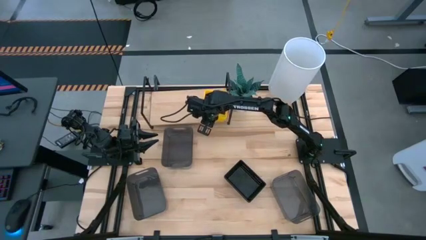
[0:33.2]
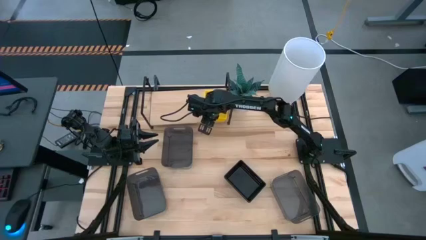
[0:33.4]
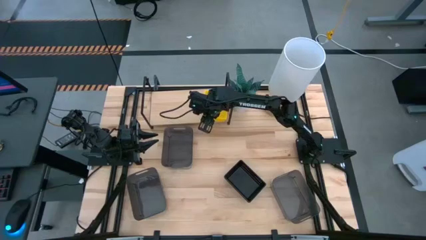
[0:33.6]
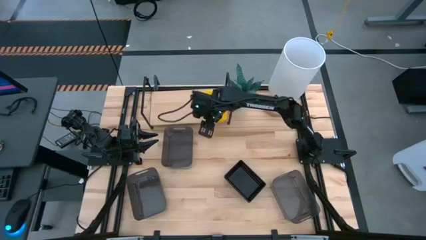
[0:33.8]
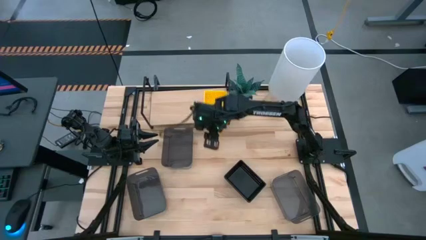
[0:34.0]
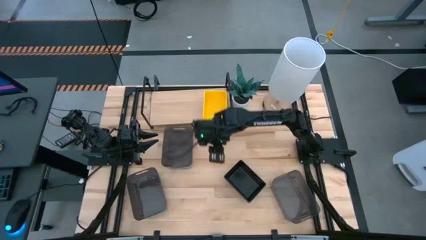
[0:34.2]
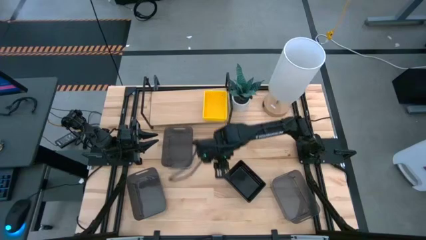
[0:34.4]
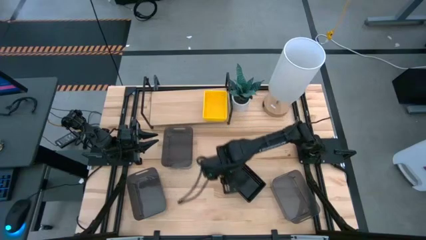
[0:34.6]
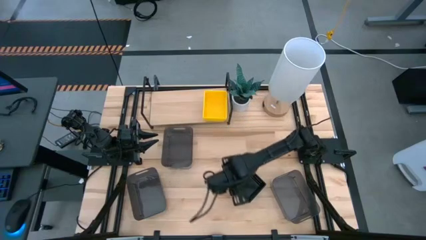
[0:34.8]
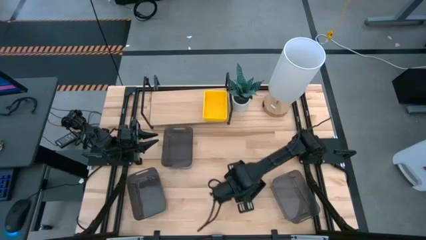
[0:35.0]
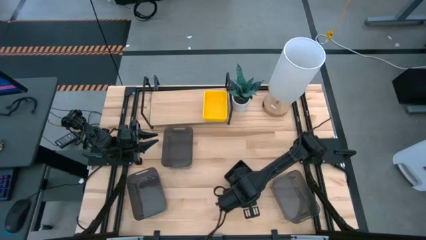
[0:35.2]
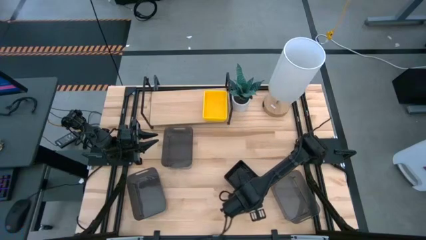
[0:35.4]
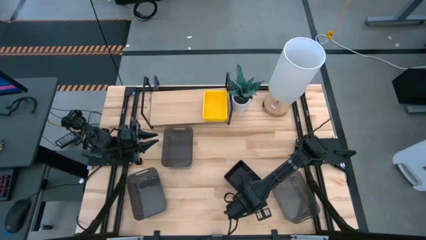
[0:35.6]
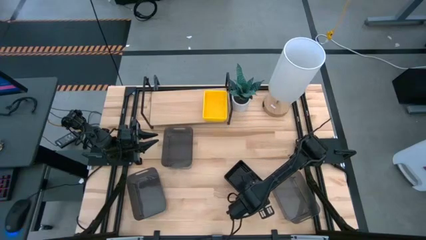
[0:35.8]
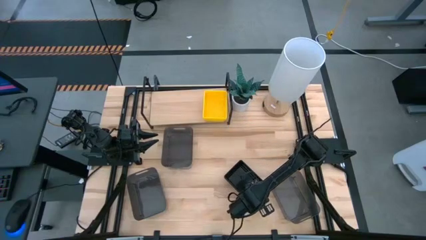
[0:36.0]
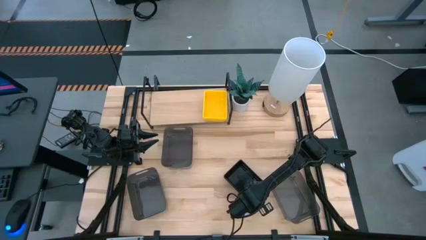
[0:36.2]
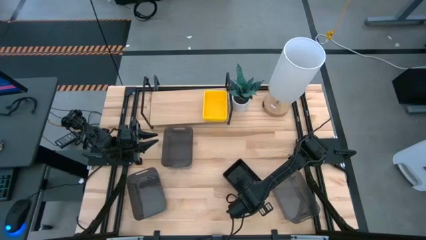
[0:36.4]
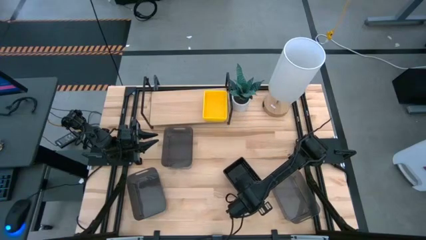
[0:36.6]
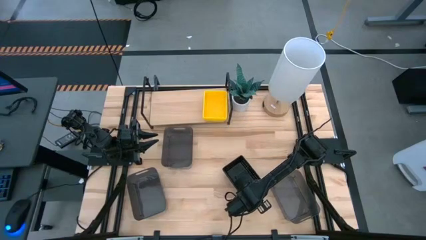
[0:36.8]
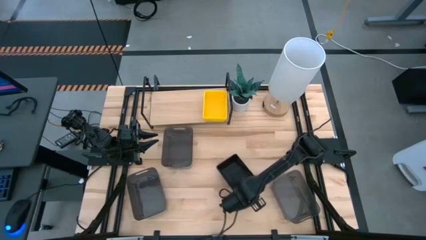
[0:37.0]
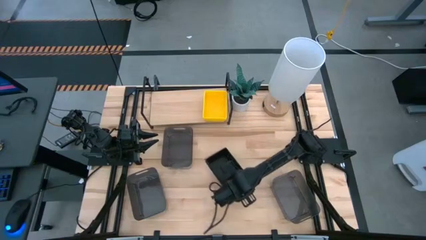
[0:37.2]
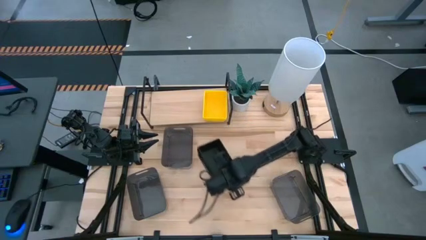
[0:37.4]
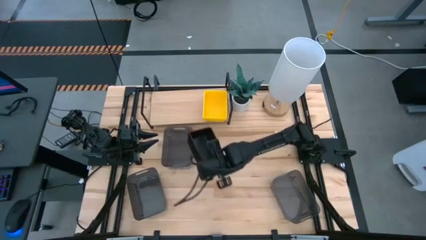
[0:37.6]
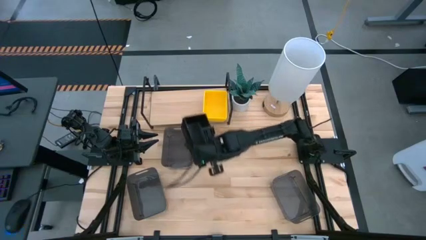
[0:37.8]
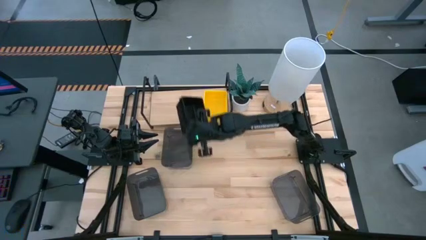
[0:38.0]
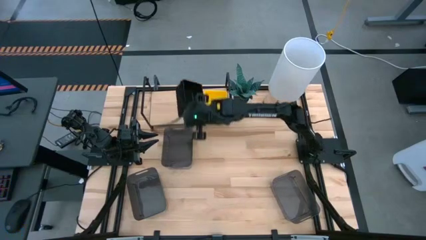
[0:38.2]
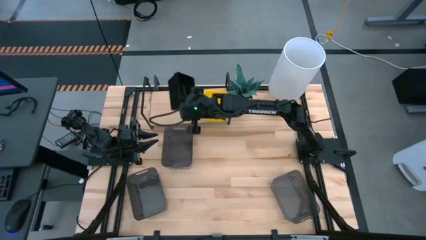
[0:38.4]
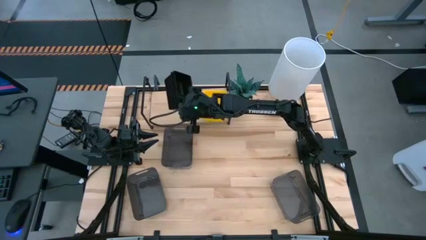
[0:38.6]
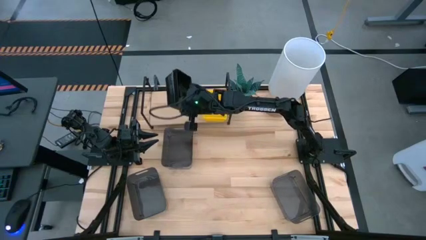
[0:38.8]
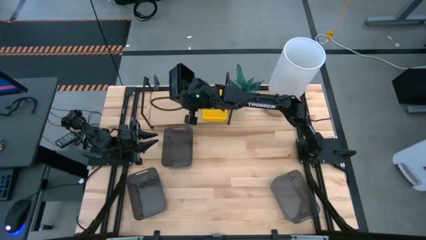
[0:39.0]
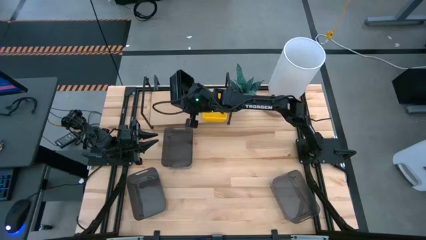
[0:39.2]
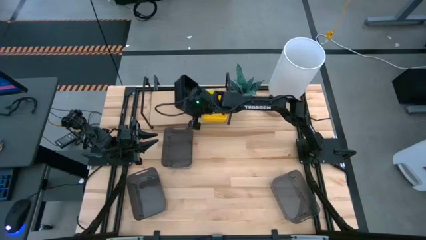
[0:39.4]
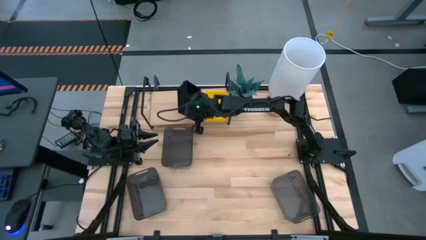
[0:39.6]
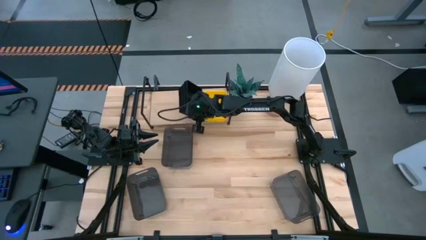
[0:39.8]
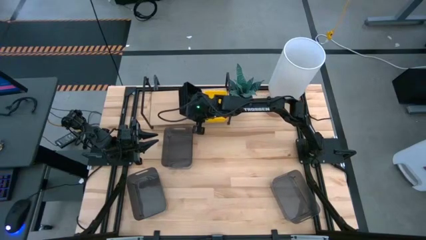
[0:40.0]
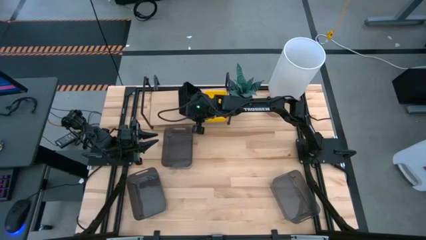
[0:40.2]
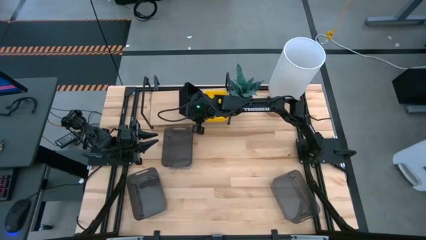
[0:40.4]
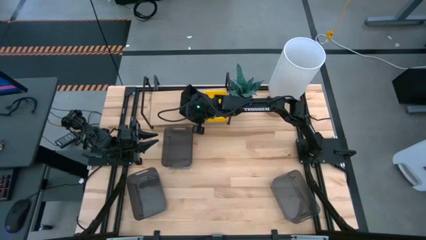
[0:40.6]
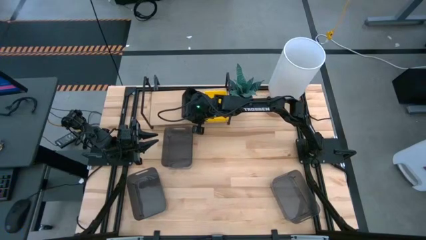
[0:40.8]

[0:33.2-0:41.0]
Task: Stack baskets on shelf by color
Put the stacked black baskets on the shelf

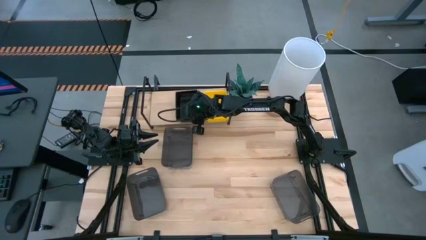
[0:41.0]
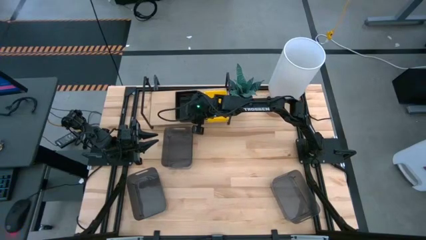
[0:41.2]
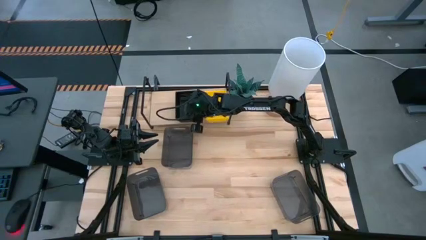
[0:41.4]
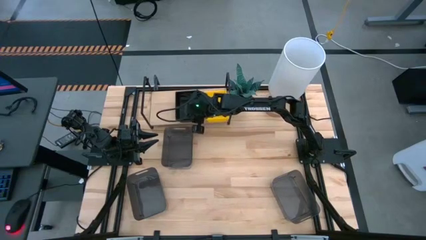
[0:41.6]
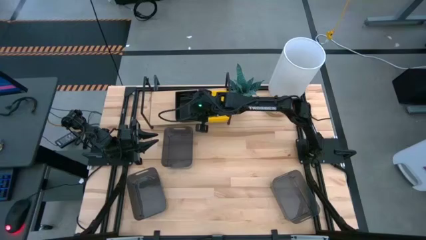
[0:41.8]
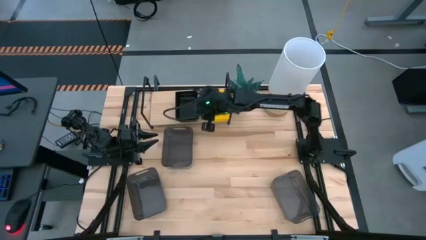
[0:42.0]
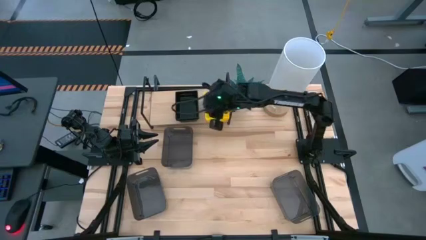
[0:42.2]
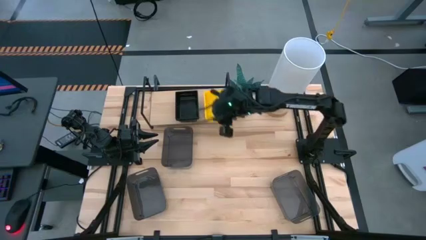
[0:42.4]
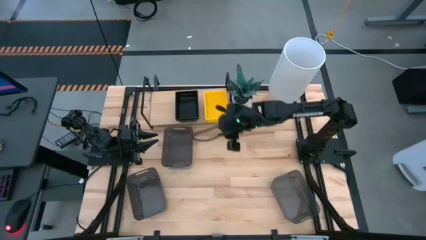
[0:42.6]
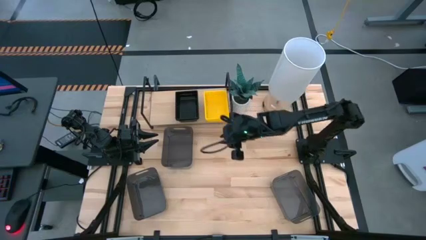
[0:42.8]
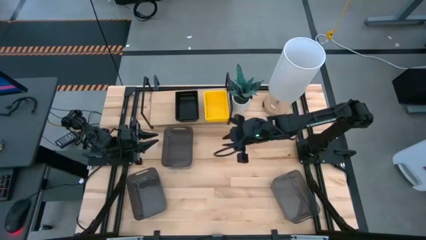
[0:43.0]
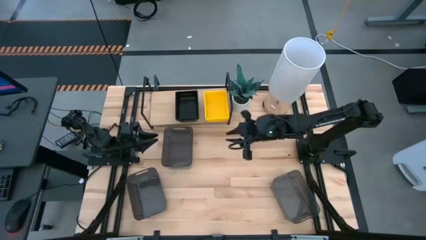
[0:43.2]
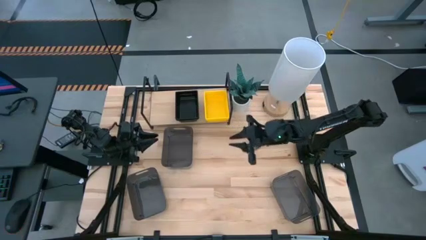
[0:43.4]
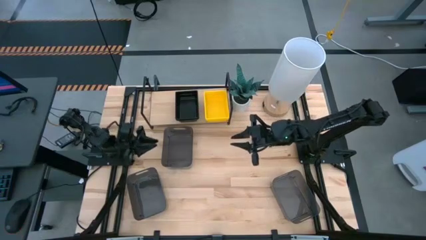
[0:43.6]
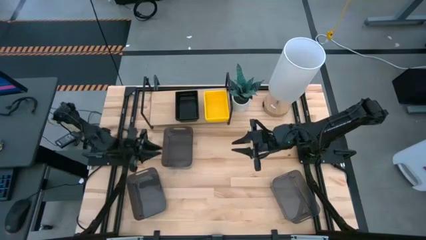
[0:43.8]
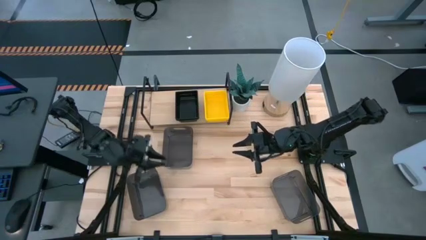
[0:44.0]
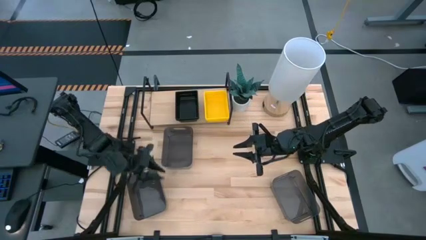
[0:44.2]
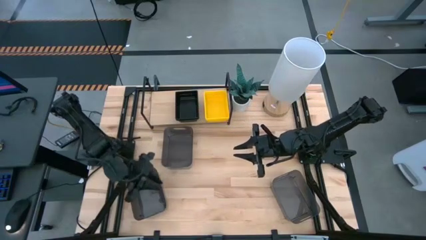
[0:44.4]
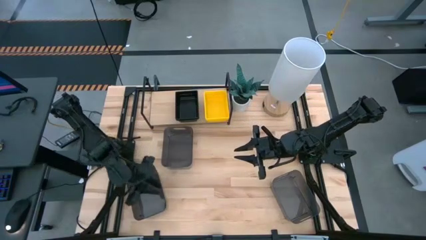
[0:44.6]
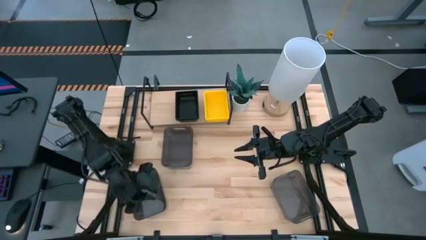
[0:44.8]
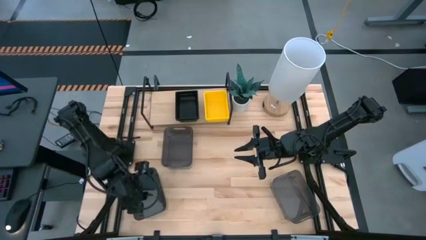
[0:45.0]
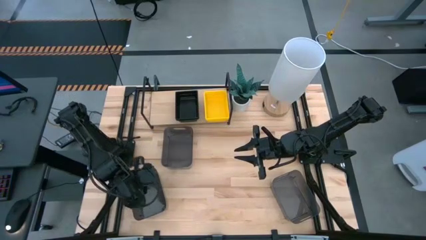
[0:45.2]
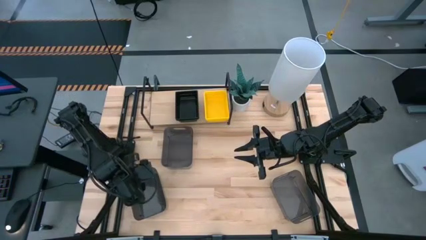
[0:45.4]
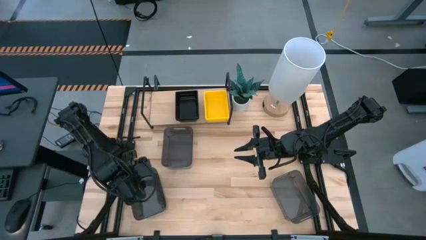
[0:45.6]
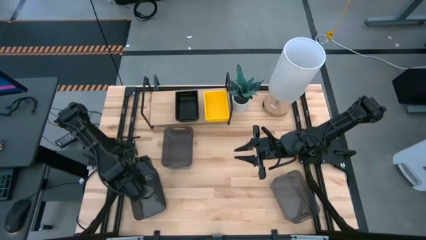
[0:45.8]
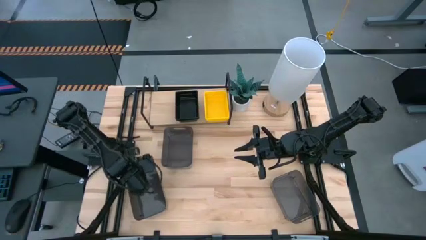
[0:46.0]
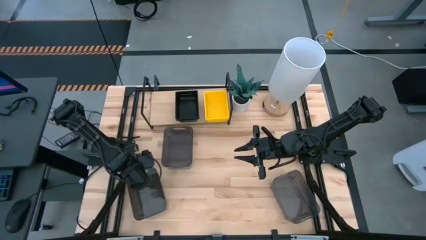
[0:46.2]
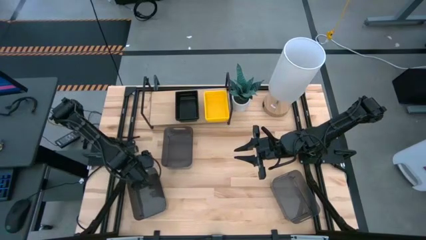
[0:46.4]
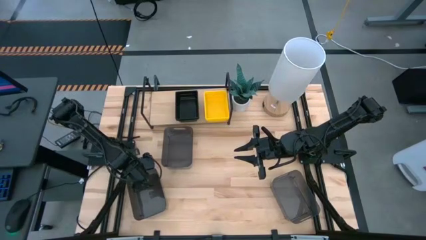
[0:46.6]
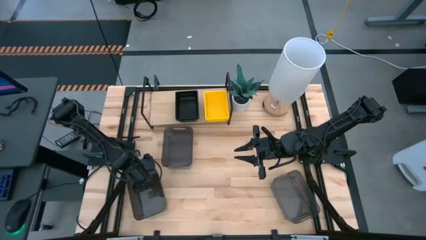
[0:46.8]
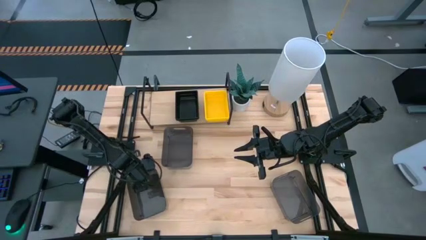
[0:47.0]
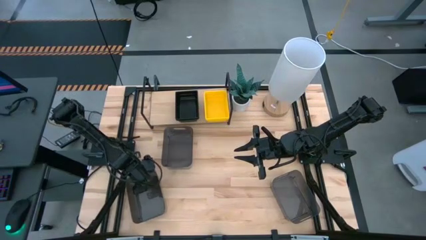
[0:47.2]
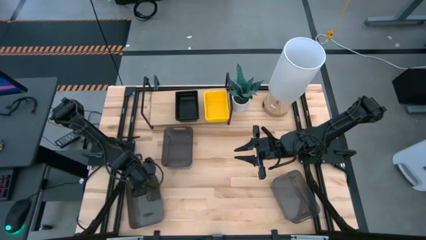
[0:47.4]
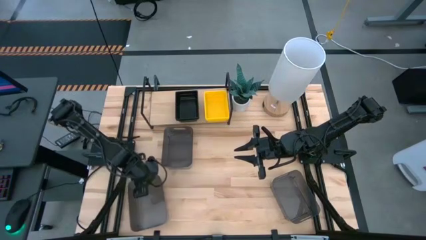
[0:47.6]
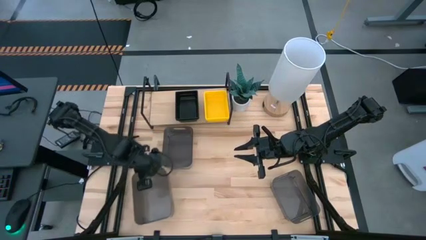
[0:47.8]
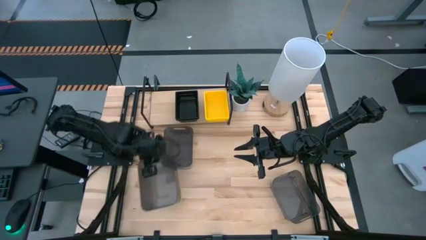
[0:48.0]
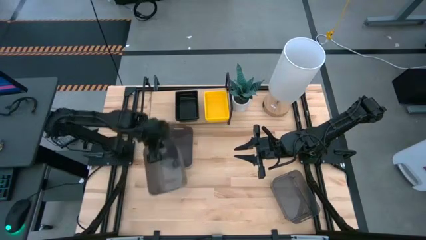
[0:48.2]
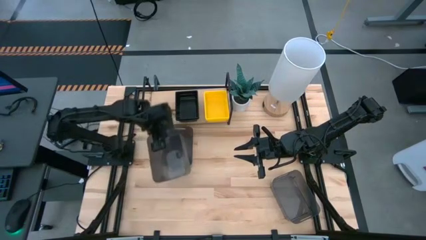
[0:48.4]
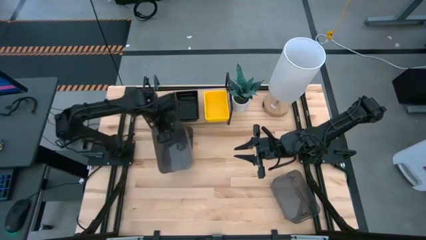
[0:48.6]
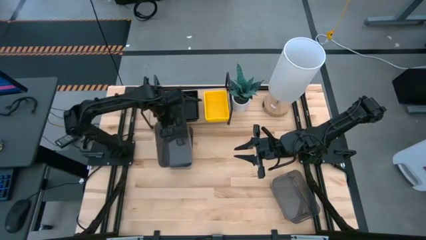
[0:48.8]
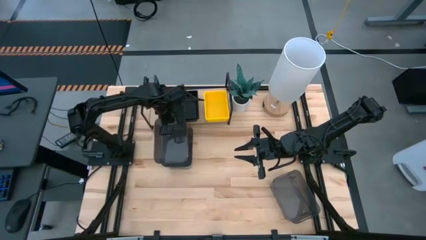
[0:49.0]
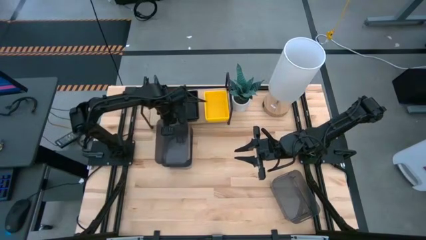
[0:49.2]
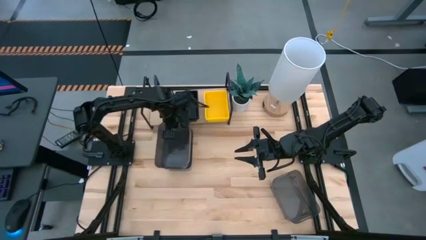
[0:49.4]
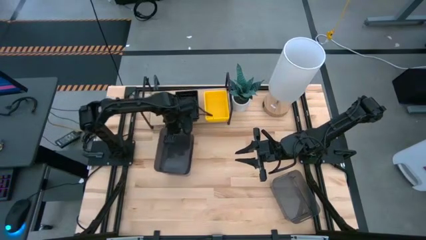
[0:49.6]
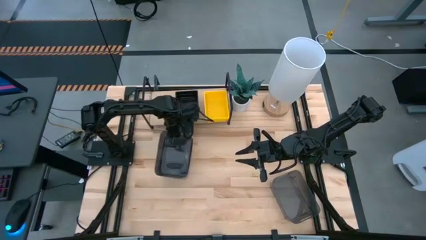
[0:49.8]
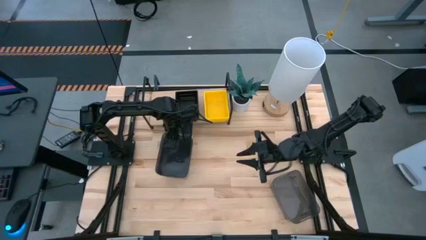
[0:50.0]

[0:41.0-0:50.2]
Stack the bottom left black bin on top of the top black bin
